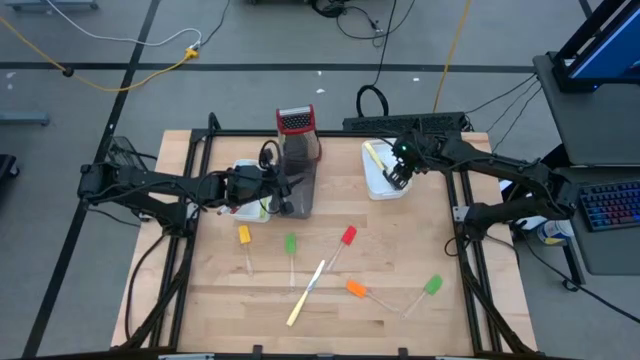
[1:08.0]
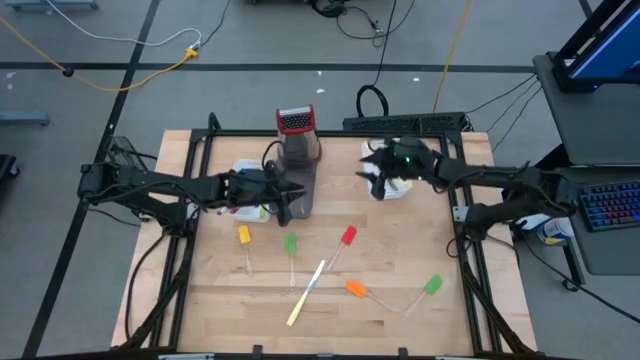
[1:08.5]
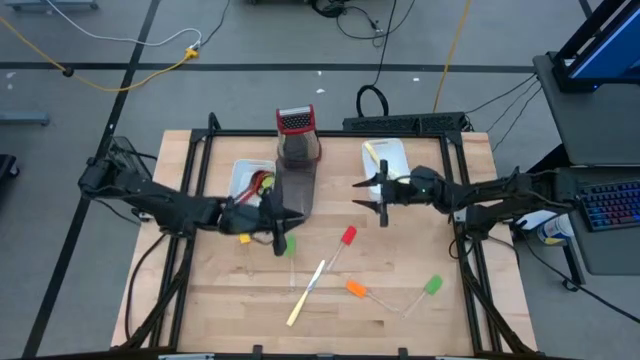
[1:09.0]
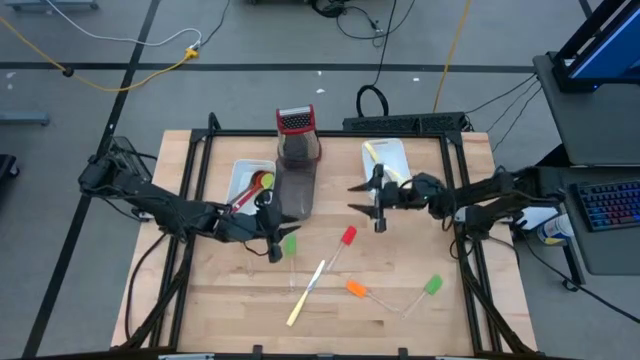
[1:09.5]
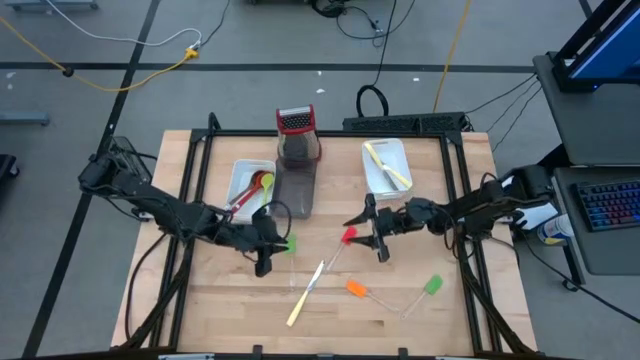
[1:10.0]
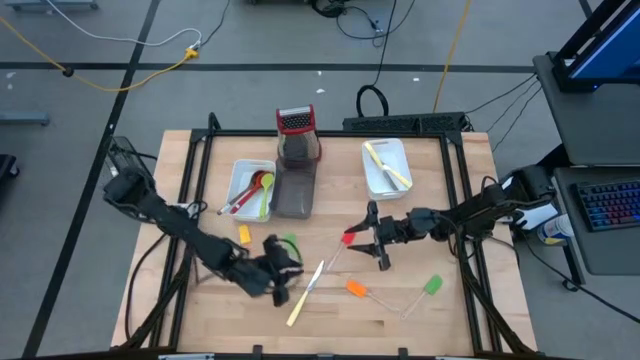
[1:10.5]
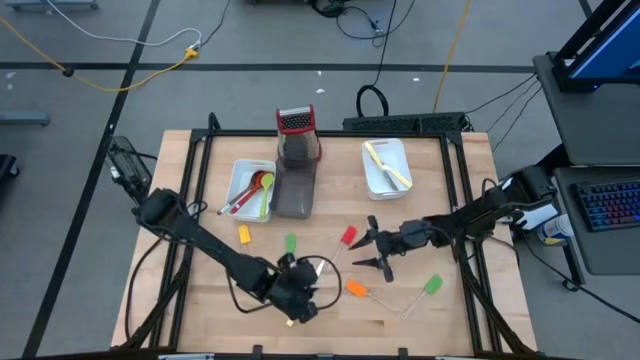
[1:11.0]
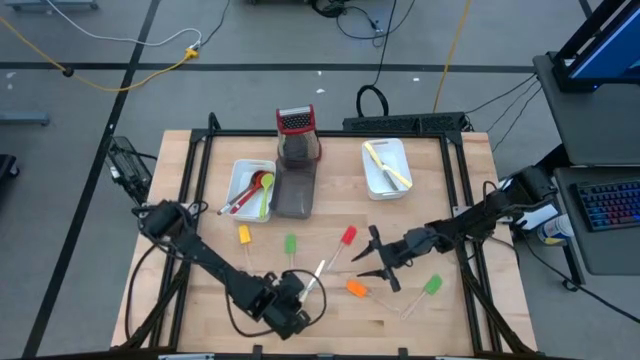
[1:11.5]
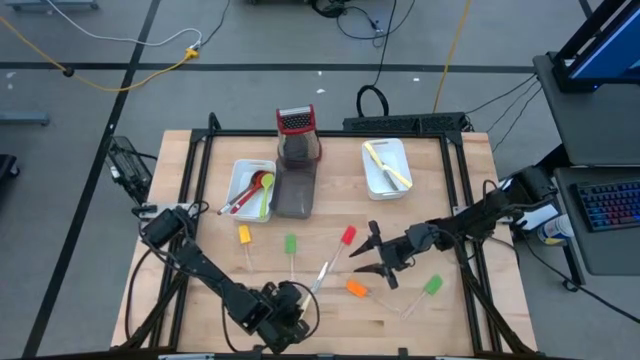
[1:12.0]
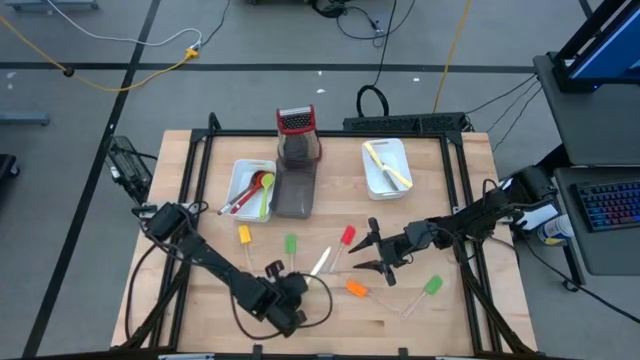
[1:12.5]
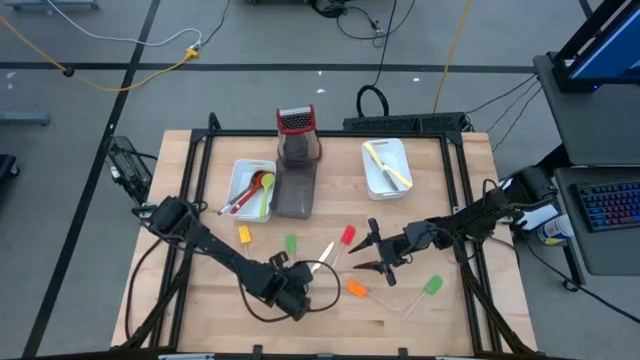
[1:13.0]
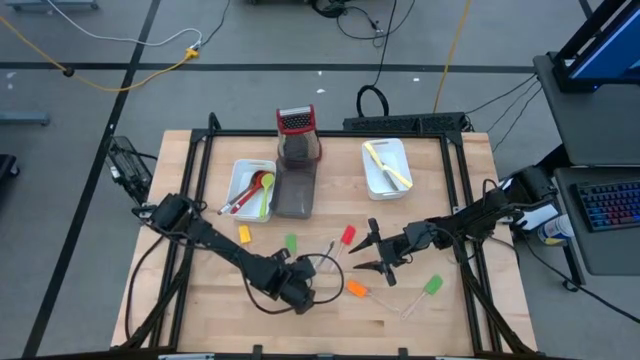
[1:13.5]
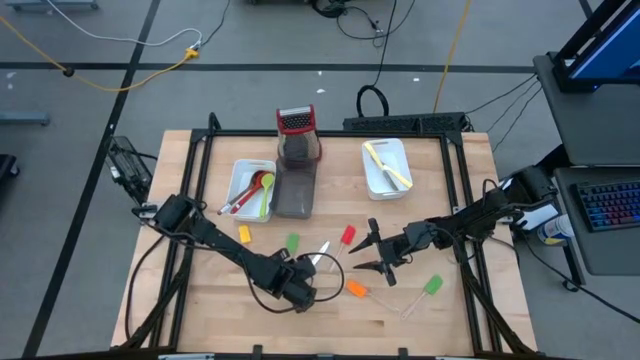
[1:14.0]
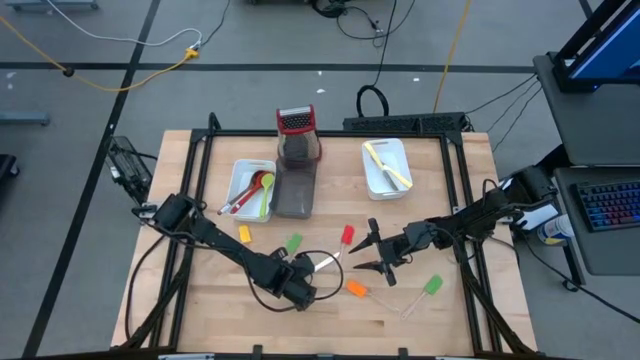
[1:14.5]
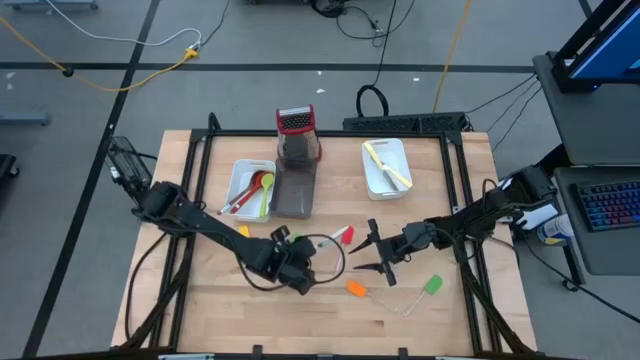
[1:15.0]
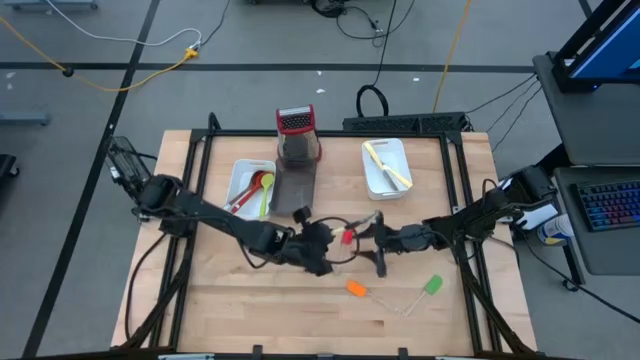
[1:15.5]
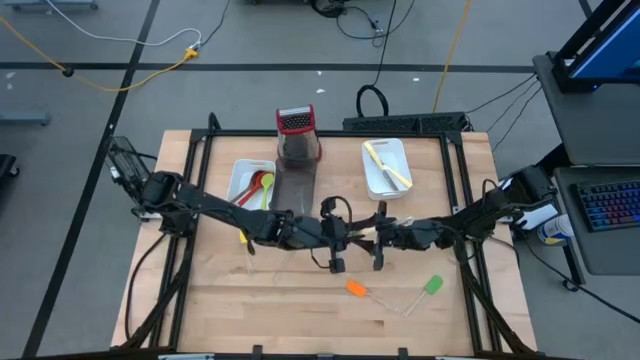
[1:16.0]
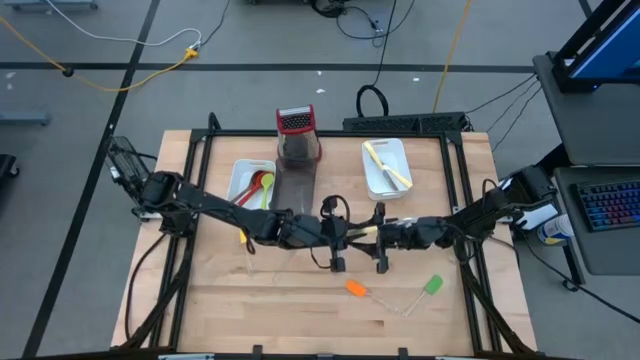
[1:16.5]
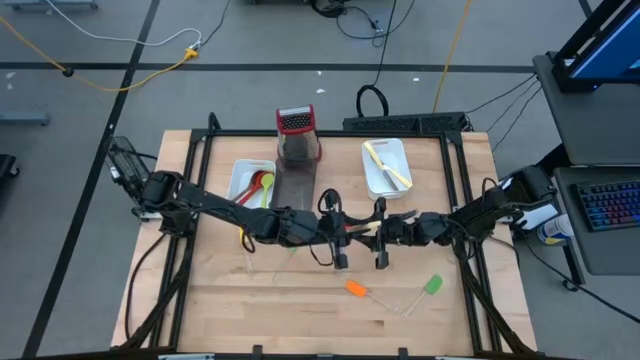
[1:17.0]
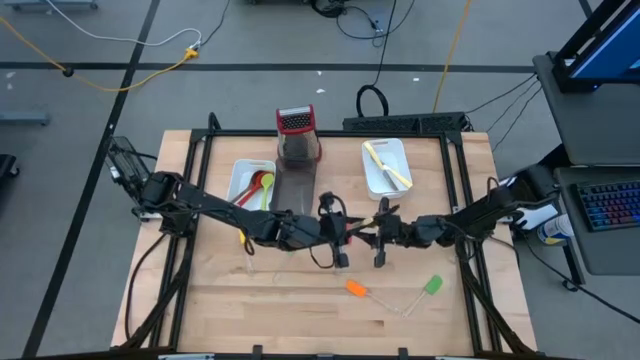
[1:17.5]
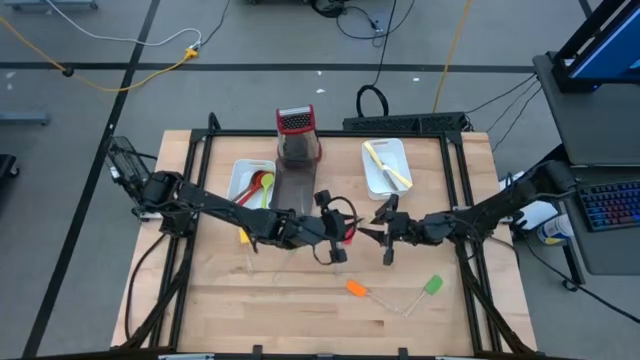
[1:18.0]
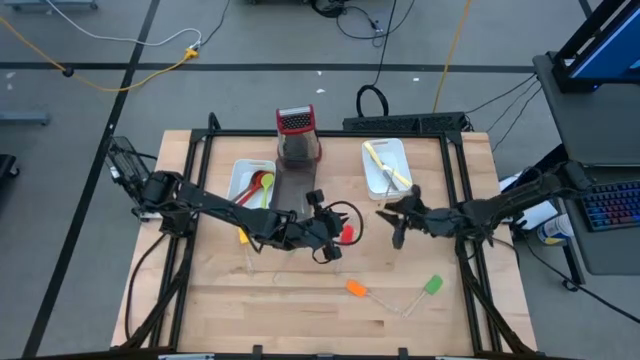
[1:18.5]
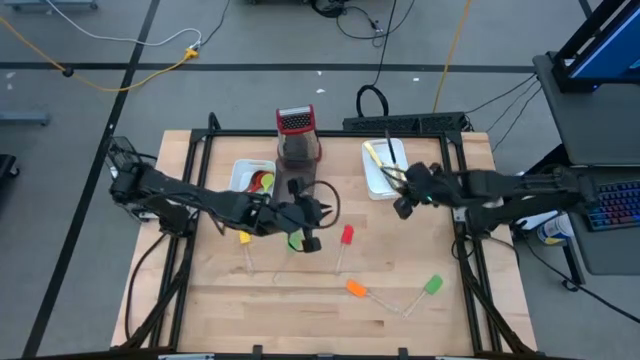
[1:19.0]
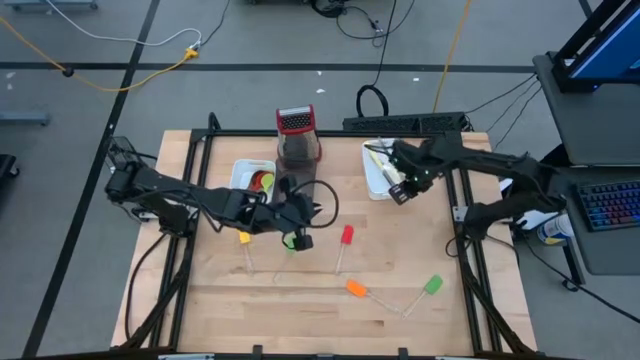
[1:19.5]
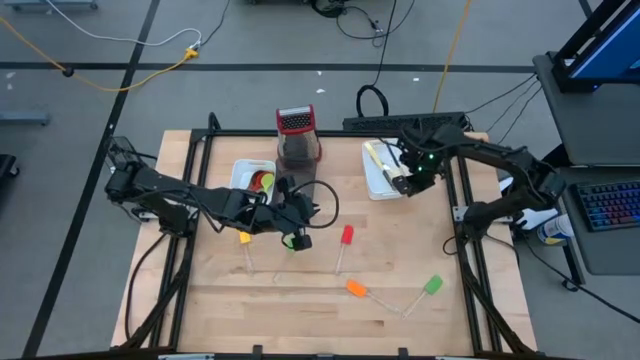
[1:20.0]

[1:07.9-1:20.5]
Task: Pick & Place Kitchen Items
Put the yellow knife into the right white bin

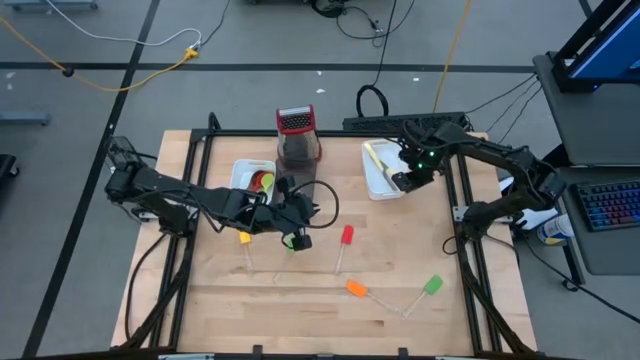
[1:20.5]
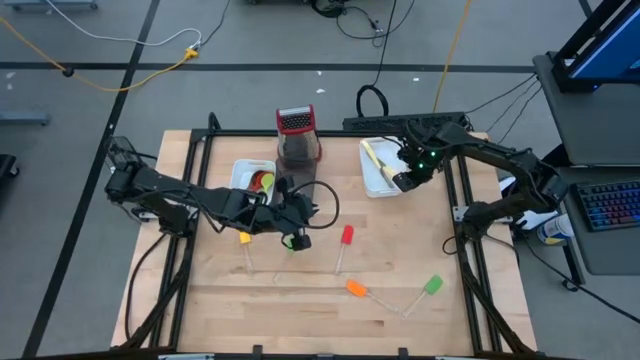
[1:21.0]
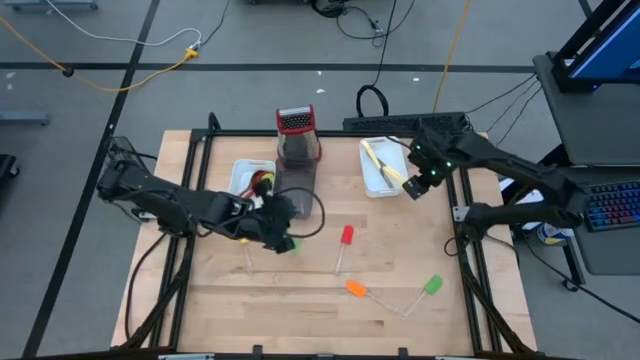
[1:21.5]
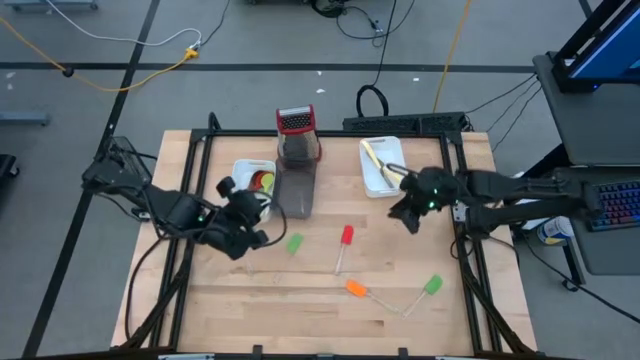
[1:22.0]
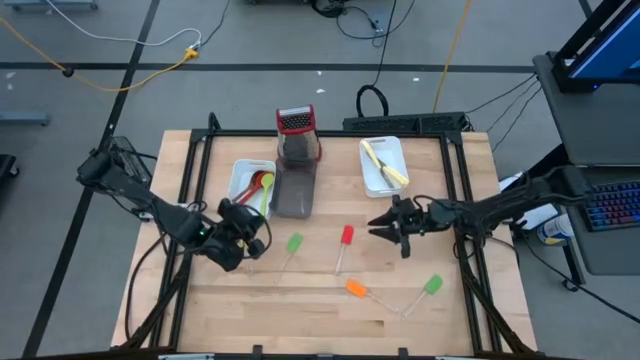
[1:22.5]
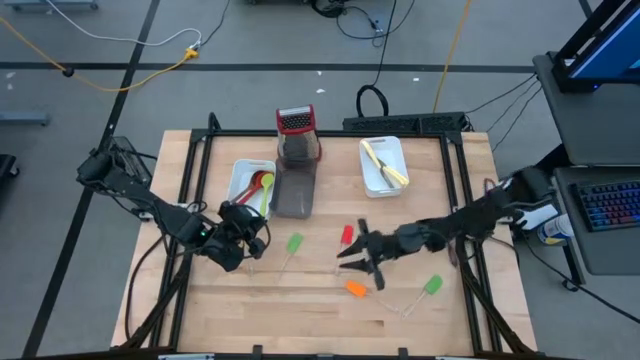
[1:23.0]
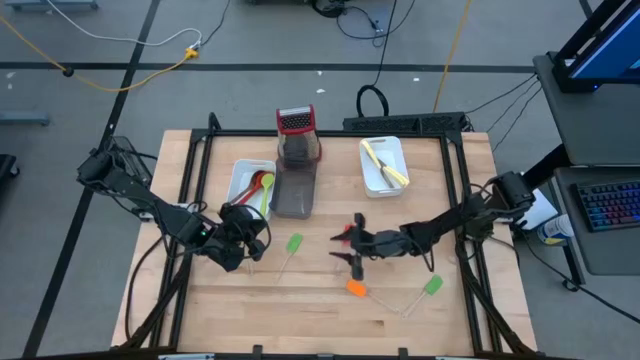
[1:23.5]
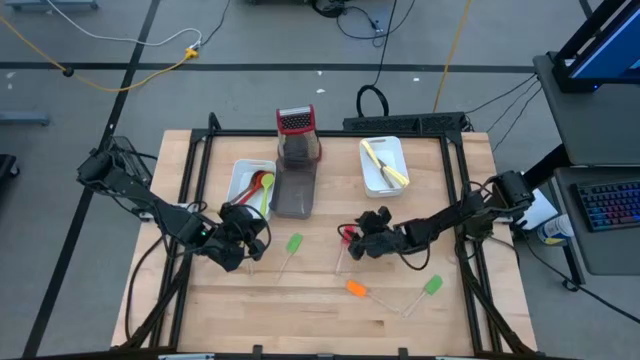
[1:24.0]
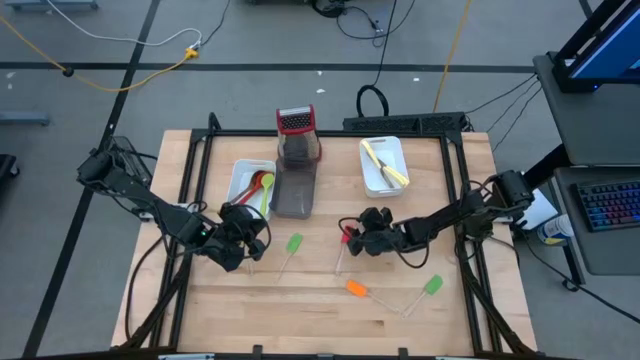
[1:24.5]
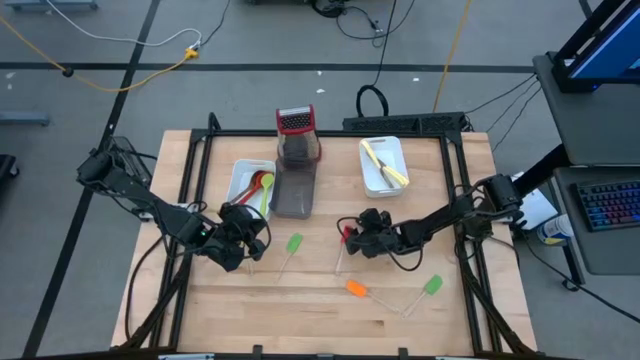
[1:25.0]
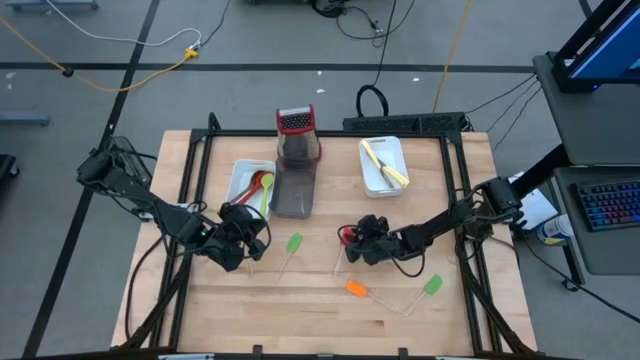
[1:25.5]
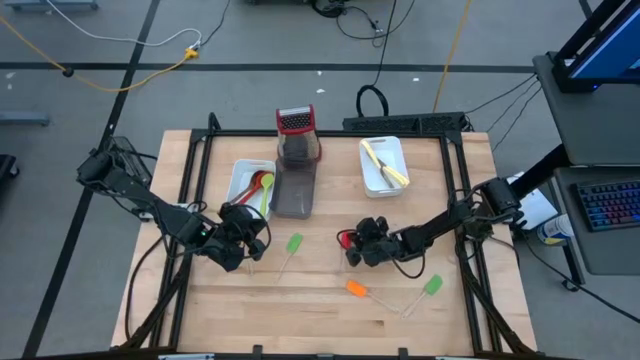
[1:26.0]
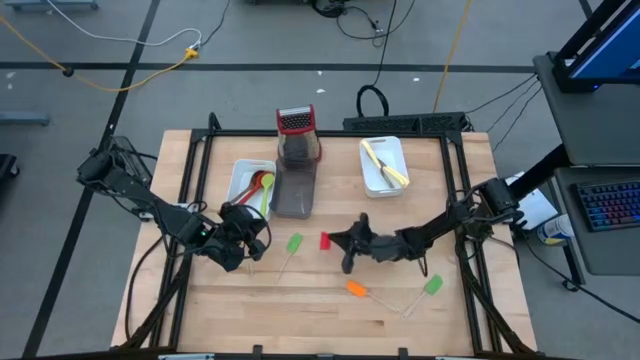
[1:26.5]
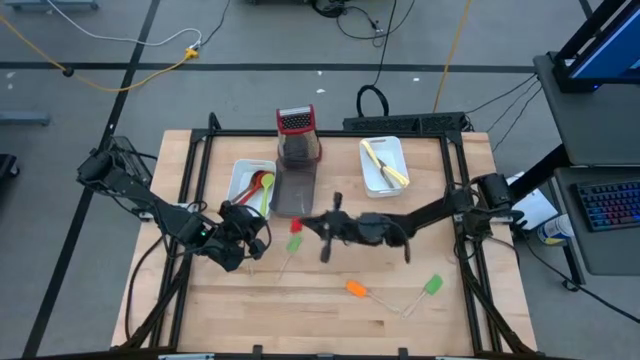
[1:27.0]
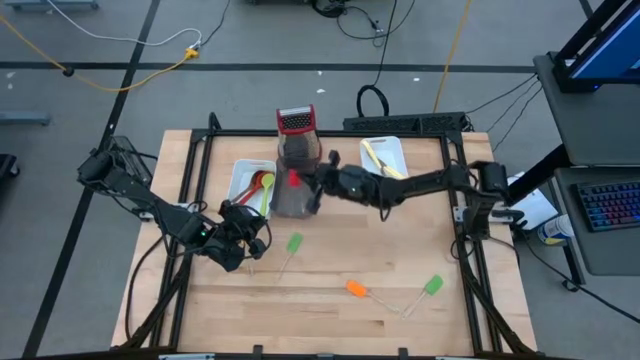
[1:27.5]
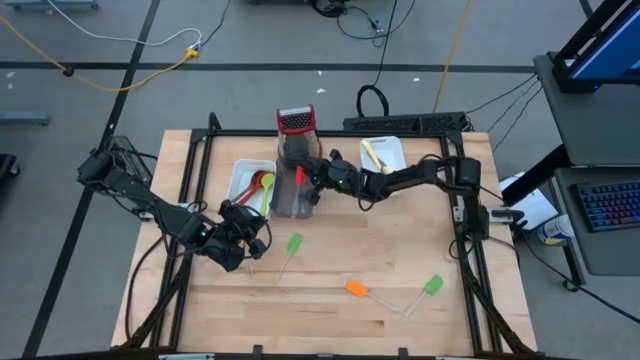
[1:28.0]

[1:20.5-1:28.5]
Put the red spatula into the black bin

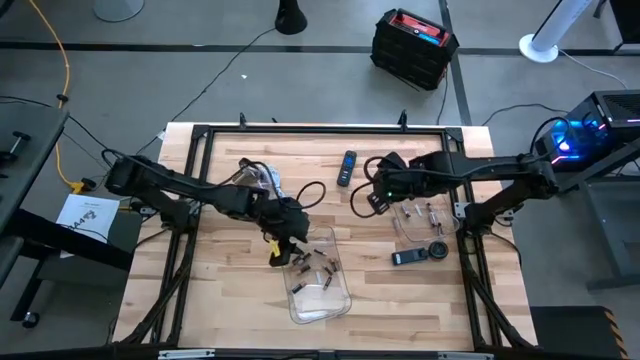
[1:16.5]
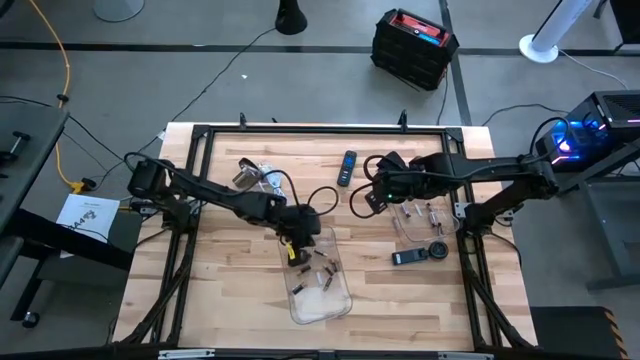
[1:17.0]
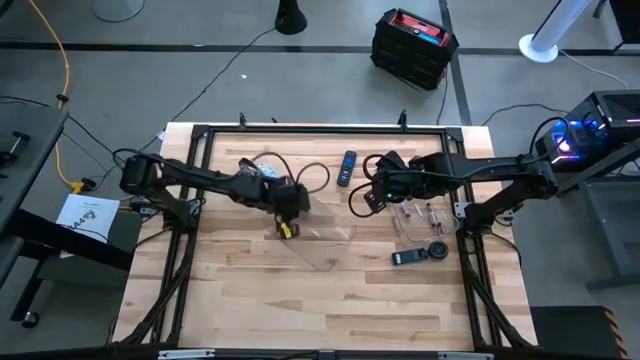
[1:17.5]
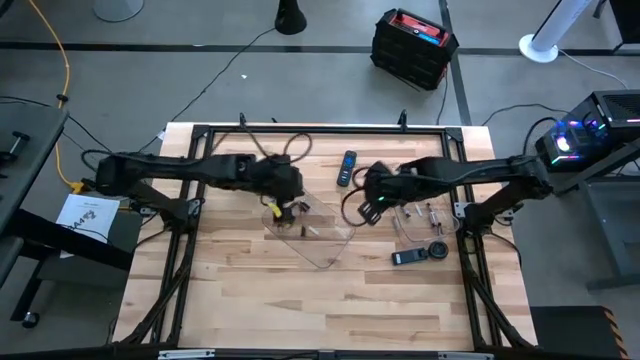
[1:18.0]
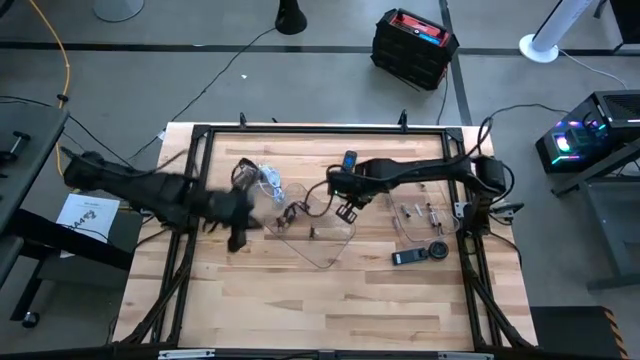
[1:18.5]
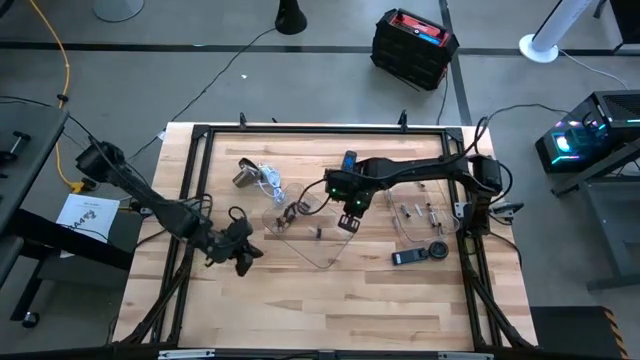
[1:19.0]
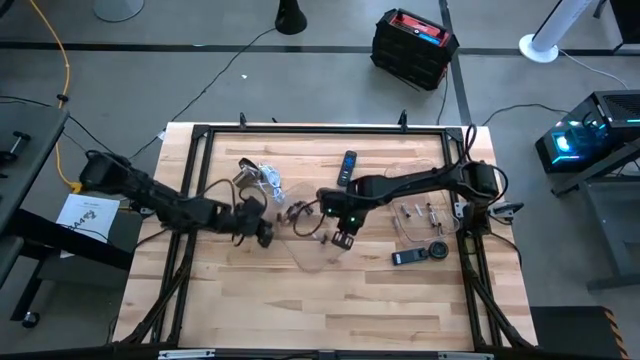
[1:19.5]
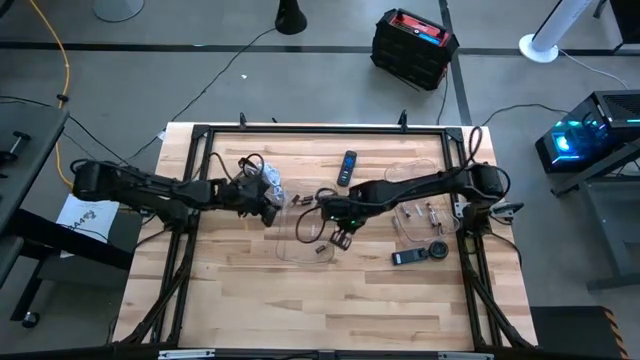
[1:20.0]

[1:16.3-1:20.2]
Task: Sort batteries
Adjust the left transparent bin
